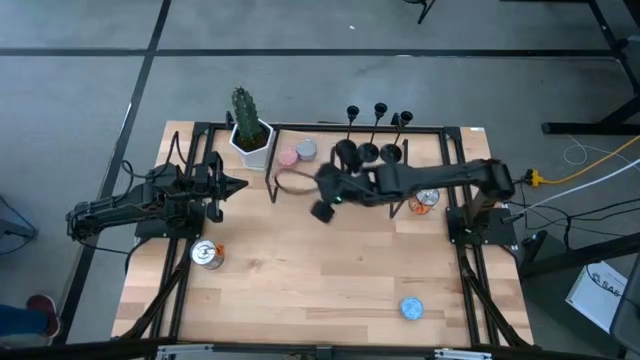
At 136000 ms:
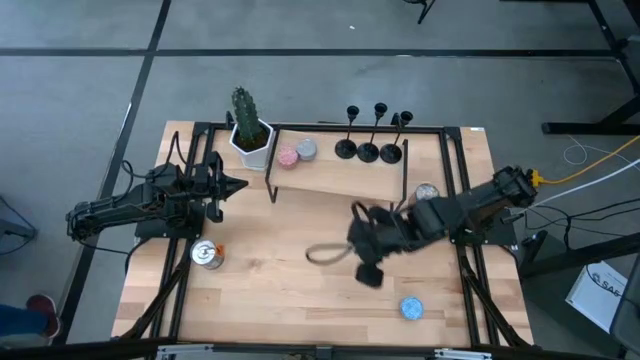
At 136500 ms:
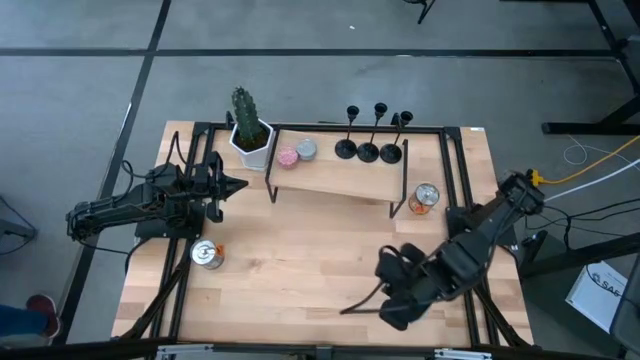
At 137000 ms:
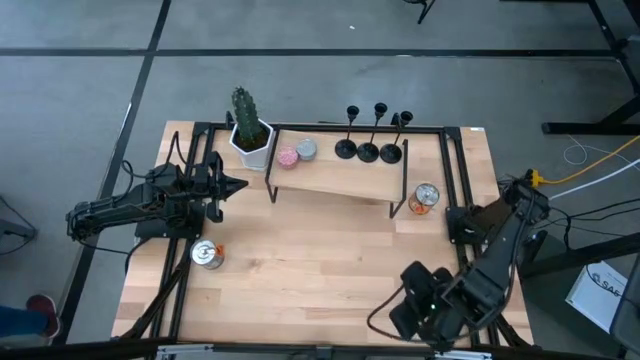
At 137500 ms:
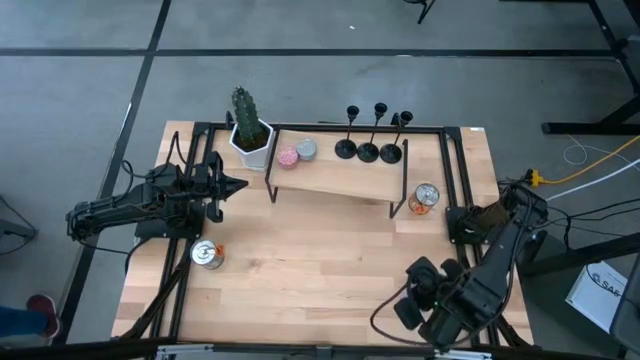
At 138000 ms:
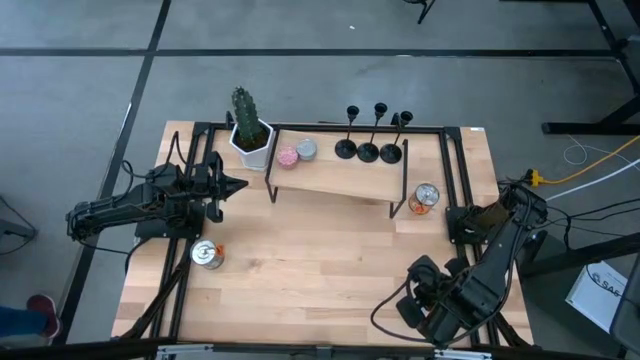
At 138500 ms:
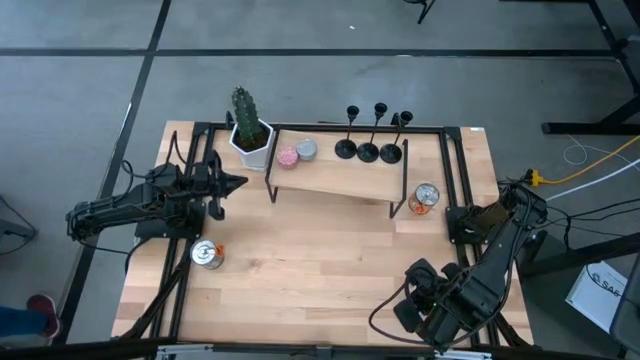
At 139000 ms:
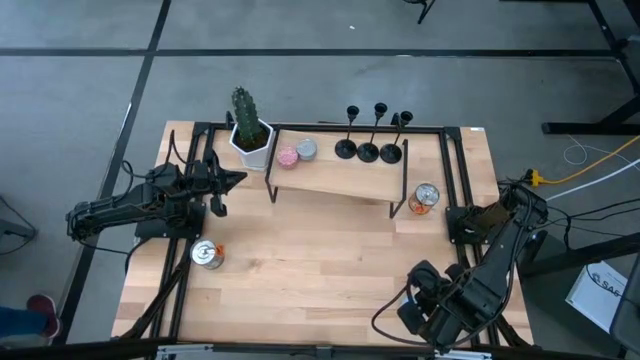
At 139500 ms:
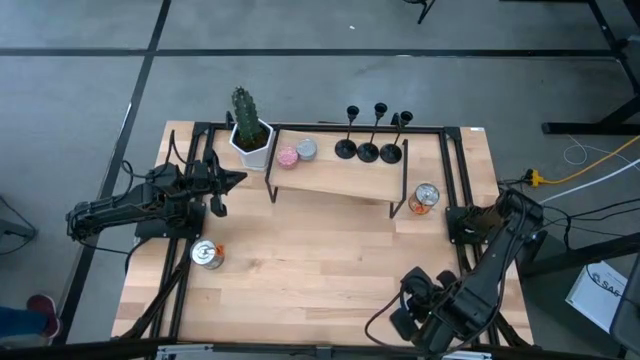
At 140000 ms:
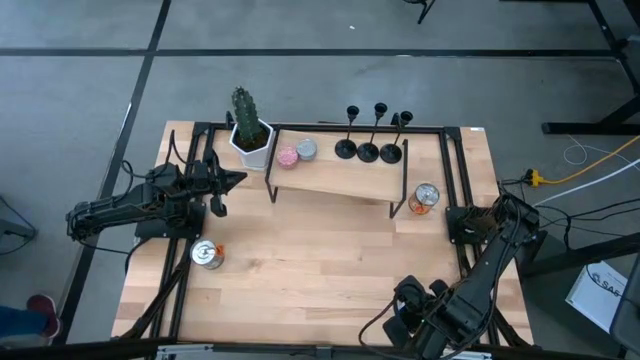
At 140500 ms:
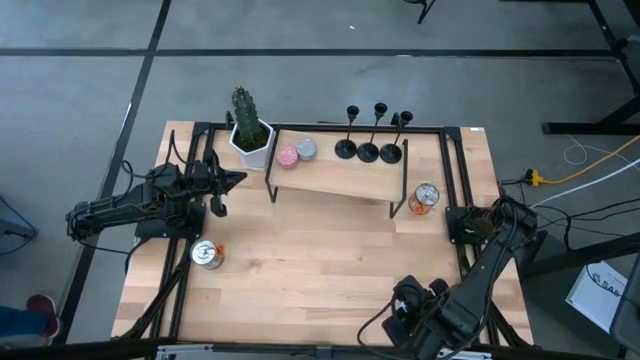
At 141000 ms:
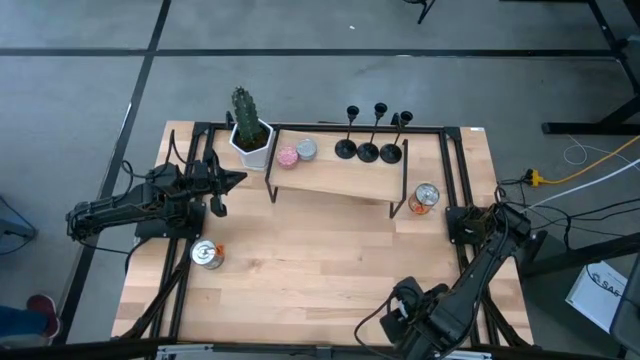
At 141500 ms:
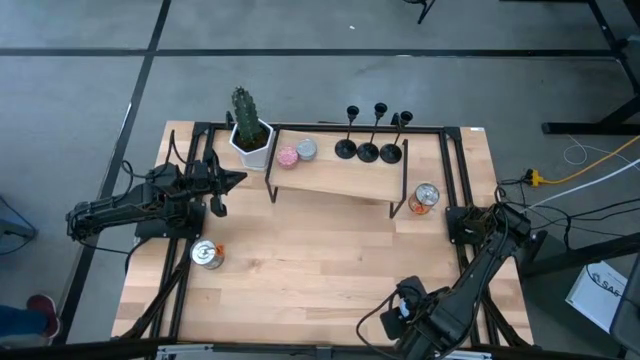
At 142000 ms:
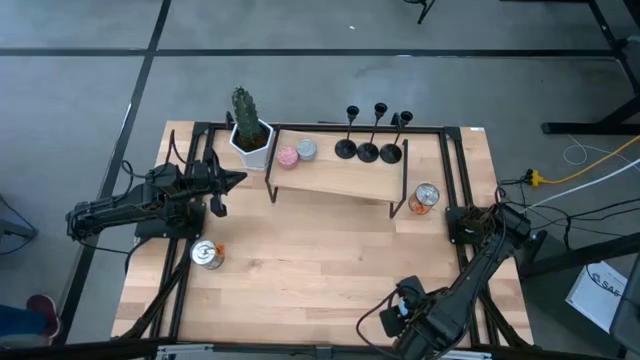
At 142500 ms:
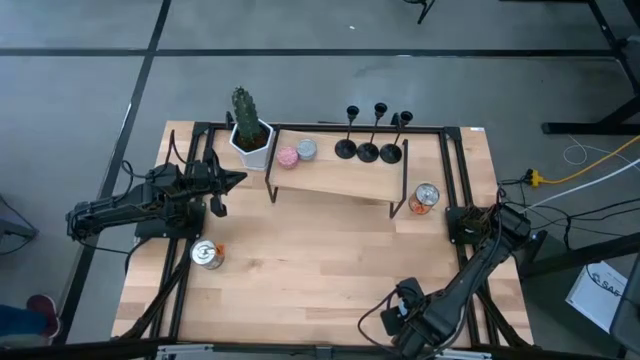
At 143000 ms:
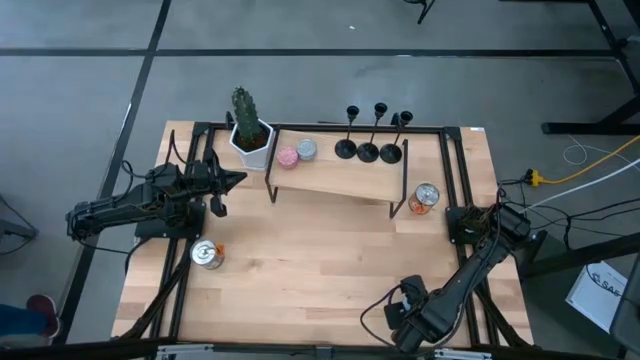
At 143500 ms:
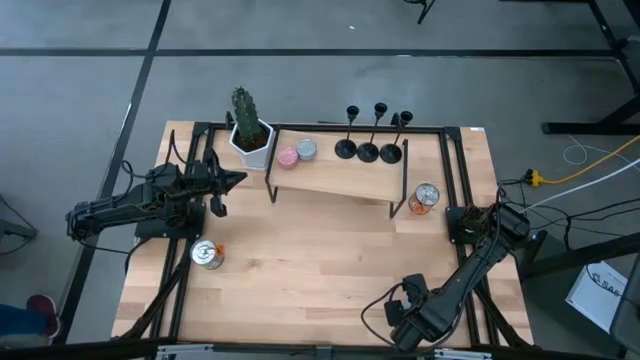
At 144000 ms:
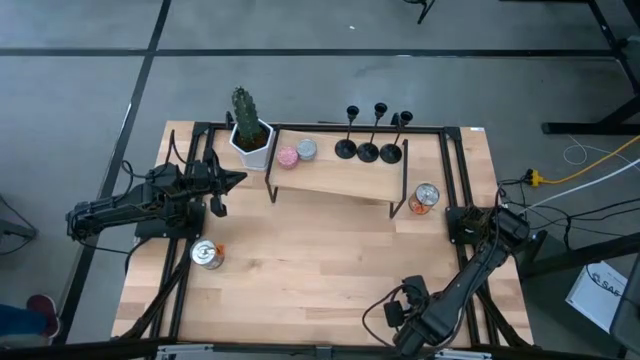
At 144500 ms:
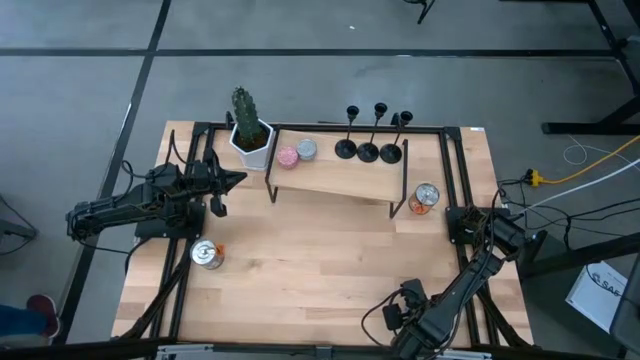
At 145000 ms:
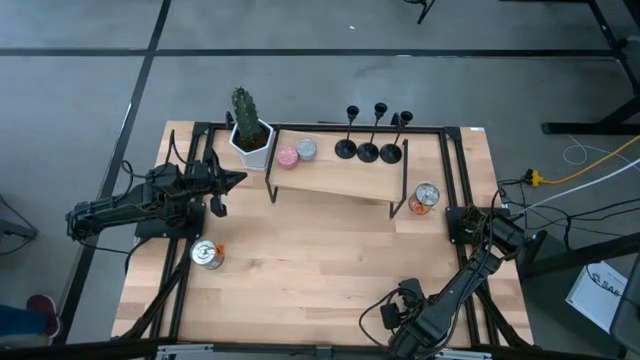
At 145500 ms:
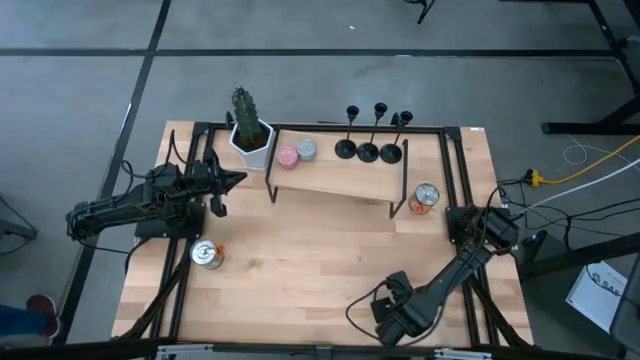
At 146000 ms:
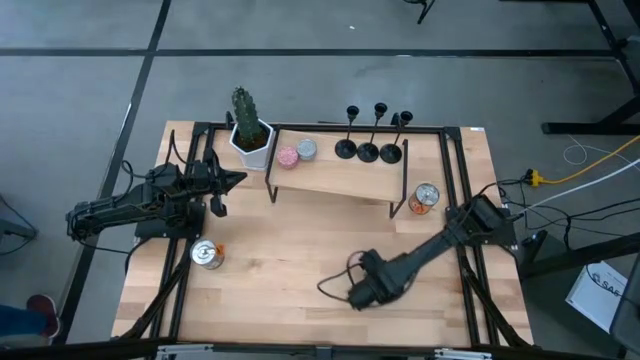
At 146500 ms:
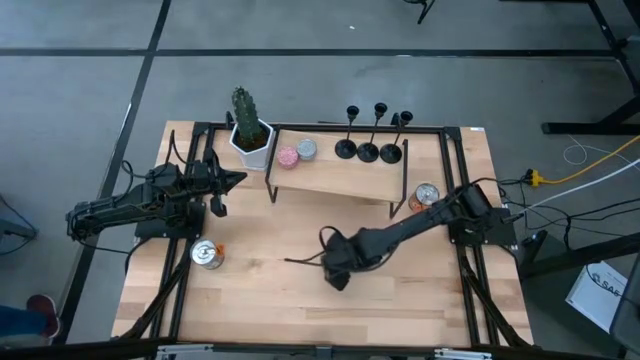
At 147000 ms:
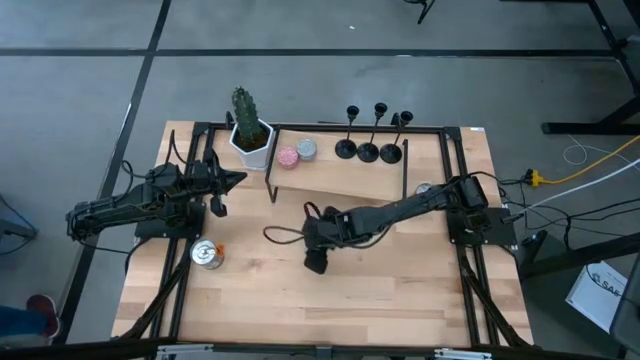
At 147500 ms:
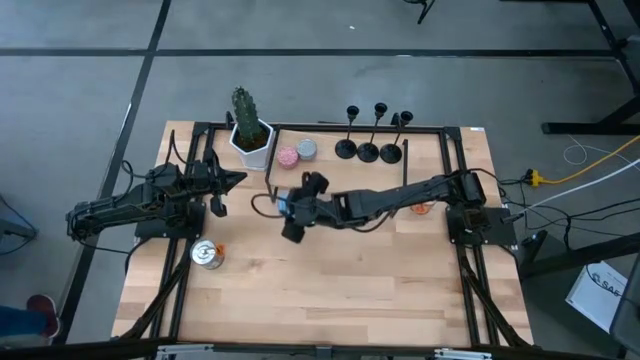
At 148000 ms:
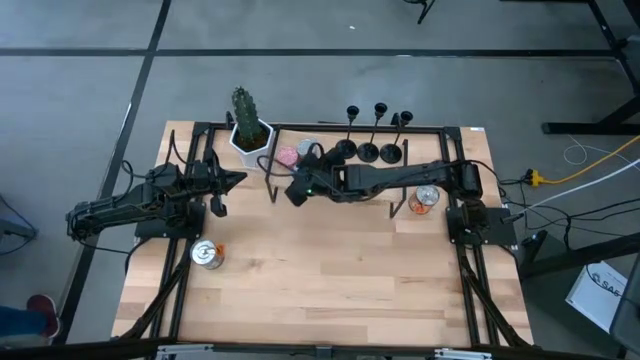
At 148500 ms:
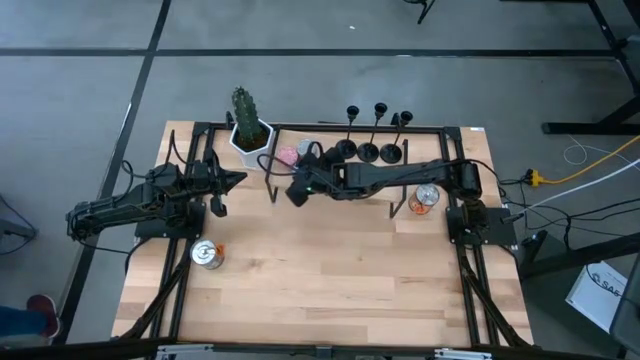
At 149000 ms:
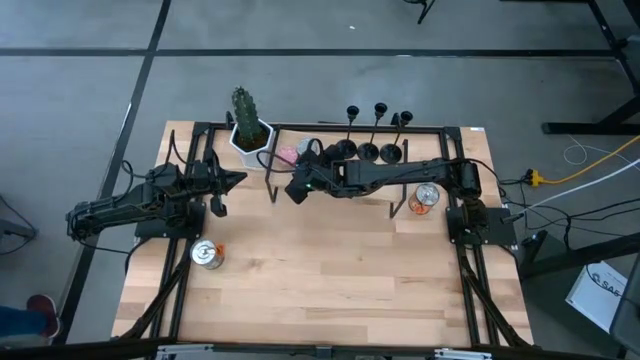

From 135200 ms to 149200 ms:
Task: Pick & Place candle stick holders
Put the light blue scented candle on the shelf

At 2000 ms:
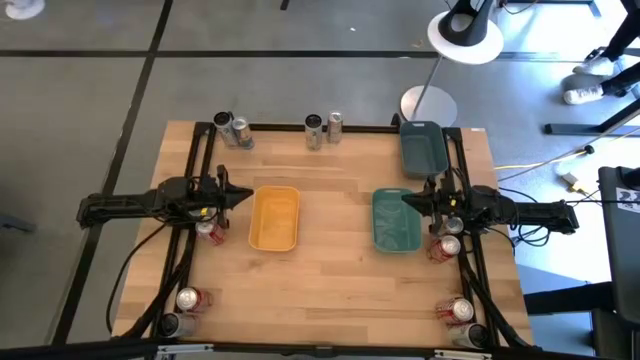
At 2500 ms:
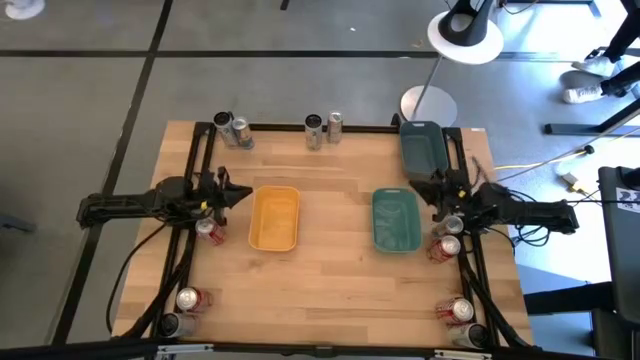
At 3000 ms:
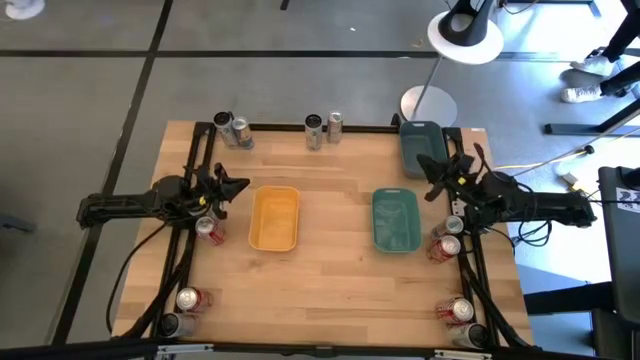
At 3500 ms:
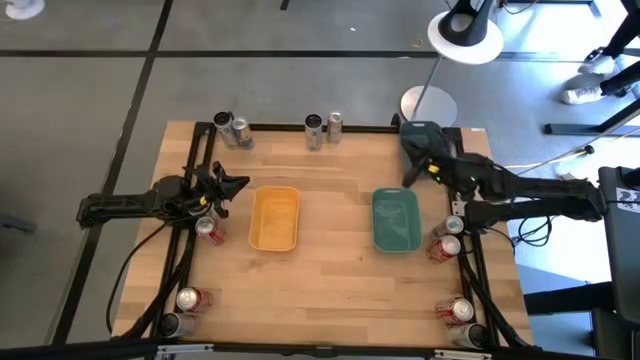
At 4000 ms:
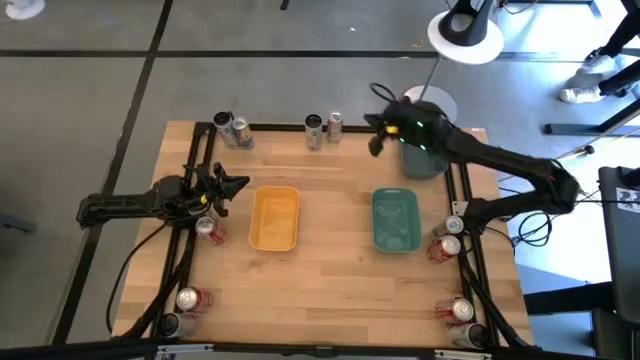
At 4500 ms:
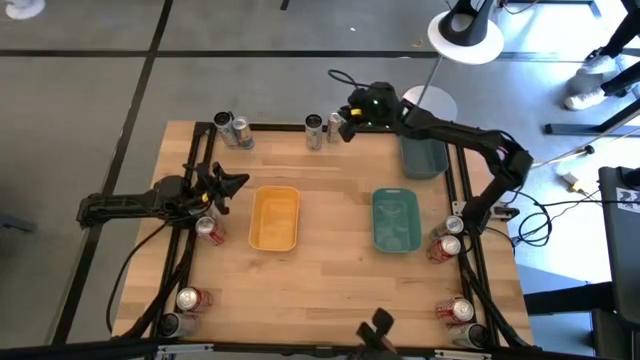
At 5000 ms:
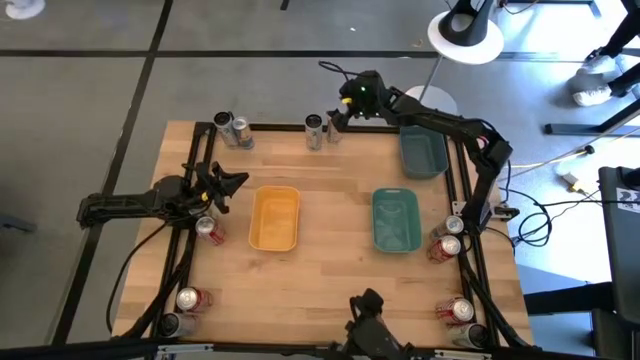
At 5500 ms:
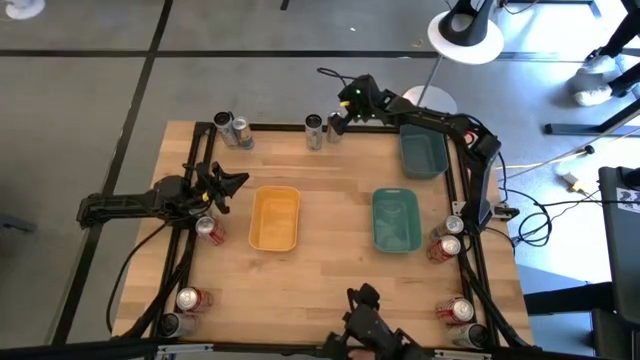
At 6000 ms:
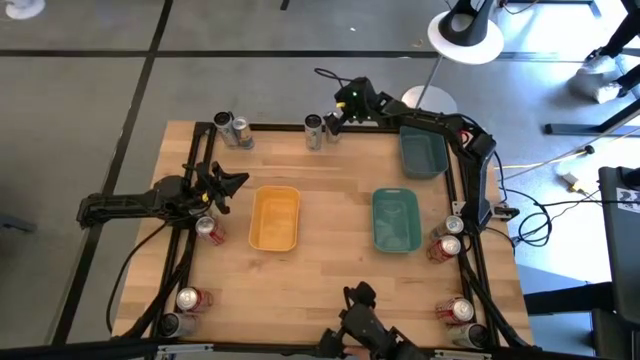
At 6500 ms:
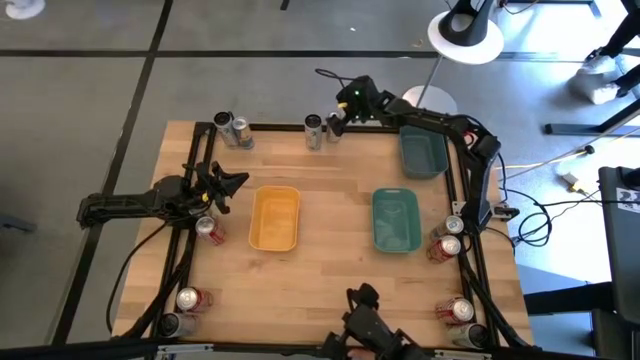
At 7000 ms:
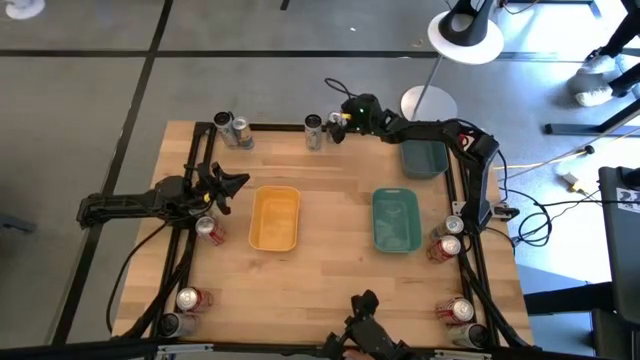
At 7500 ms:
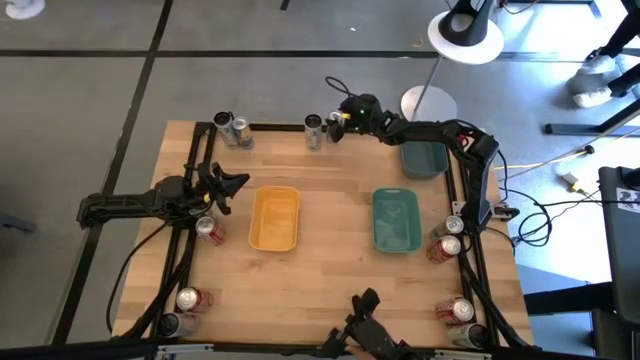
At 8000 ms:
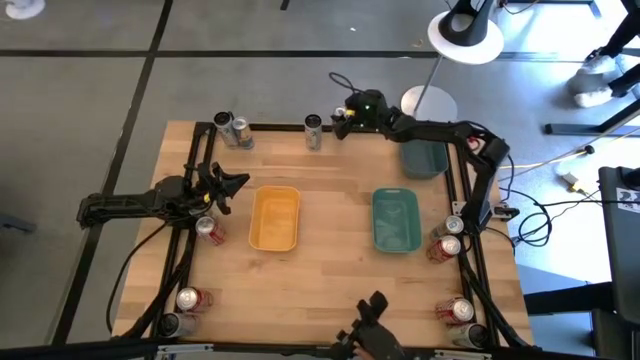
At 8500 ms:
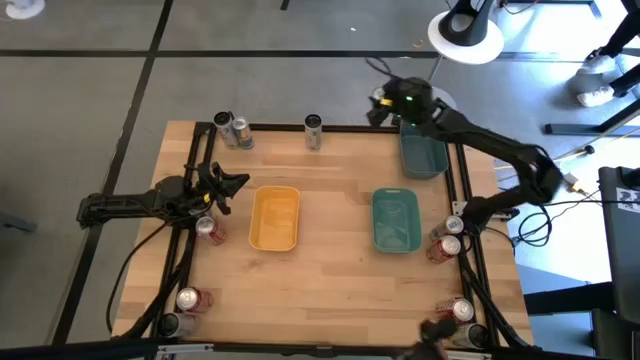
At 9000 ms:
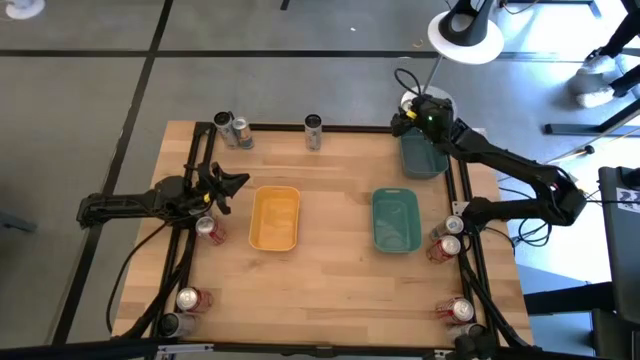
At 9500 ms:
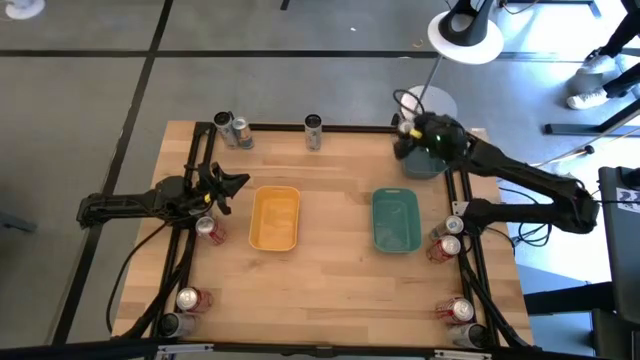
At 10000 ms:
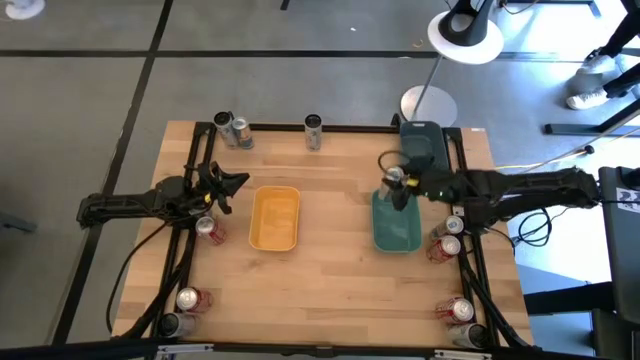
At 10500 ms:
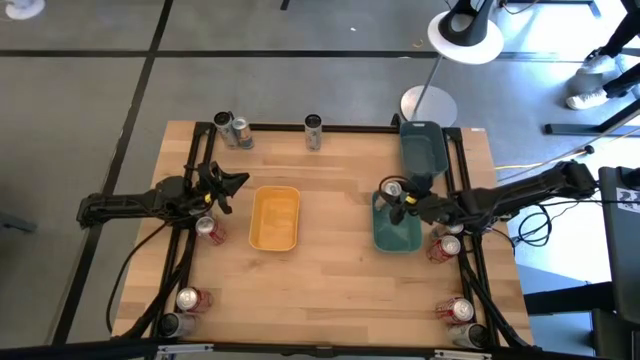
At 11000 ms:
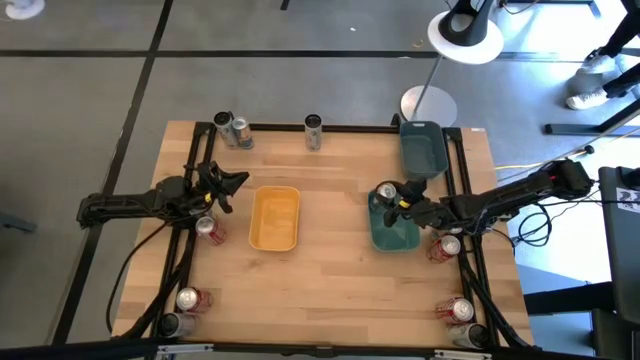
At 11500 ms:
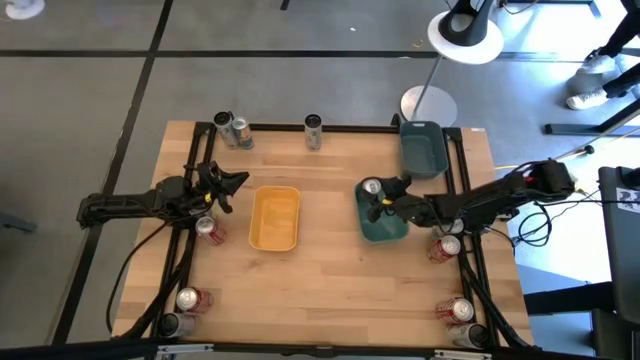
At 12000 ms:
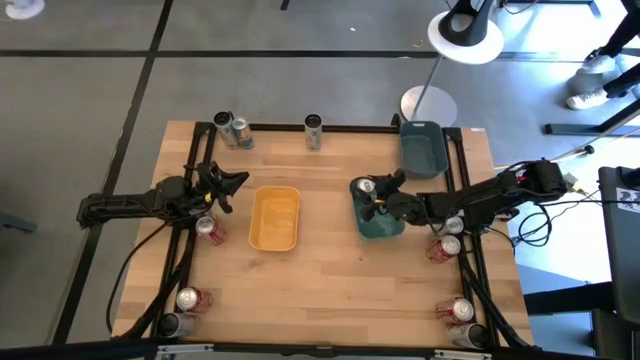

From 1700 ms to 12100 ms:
Task: Sort soda cans
Put the top right blue soda can into the green bin
